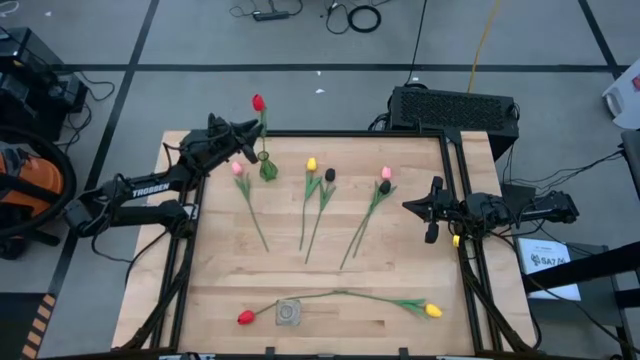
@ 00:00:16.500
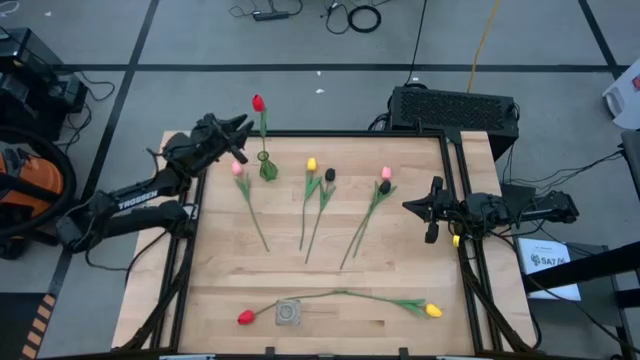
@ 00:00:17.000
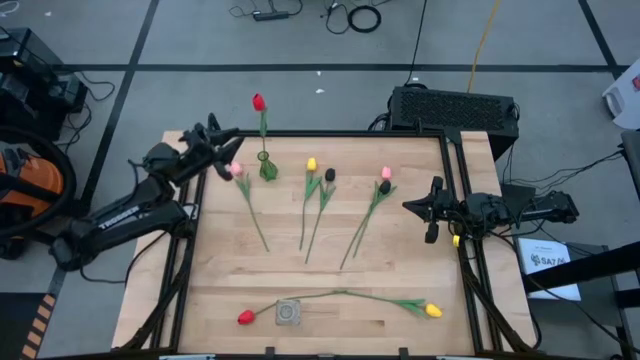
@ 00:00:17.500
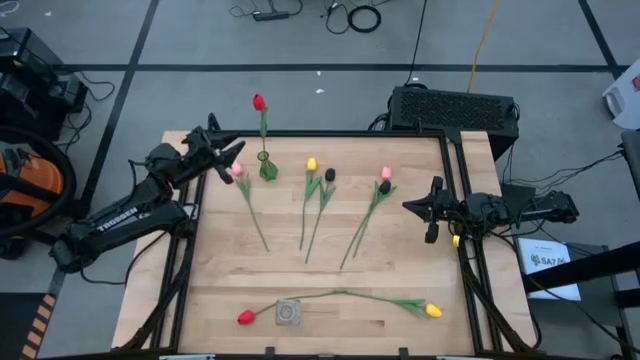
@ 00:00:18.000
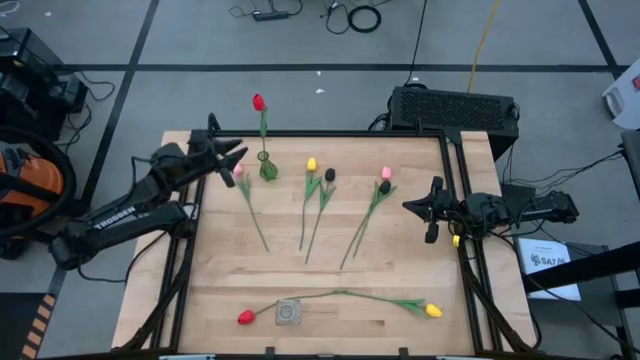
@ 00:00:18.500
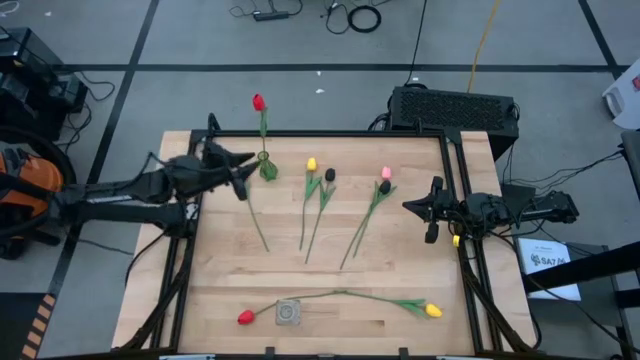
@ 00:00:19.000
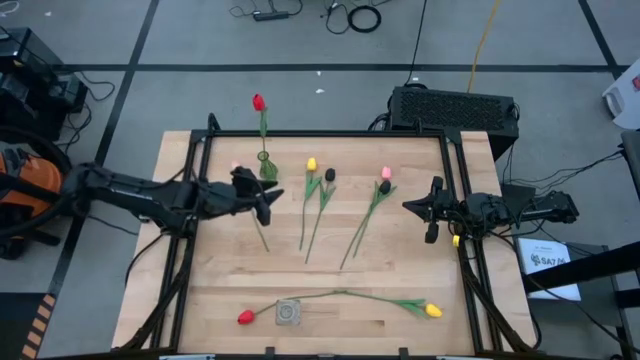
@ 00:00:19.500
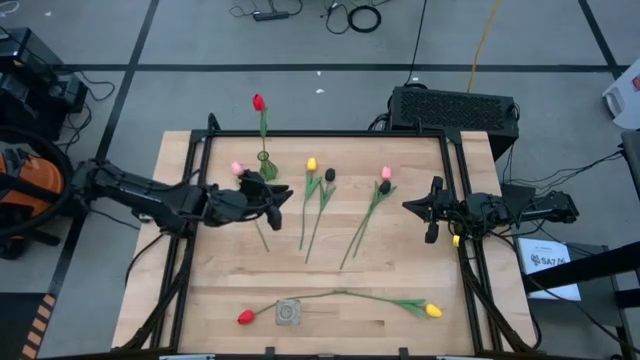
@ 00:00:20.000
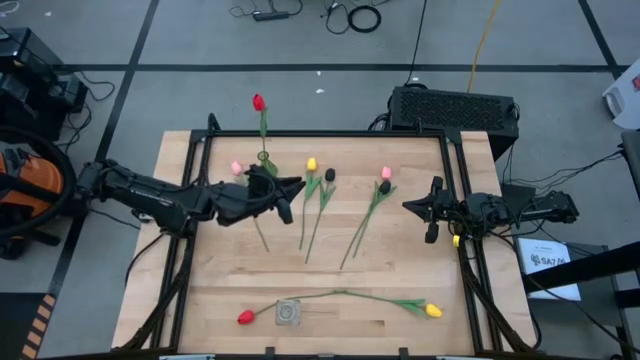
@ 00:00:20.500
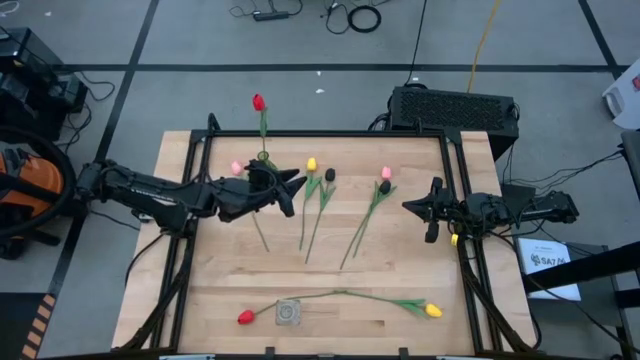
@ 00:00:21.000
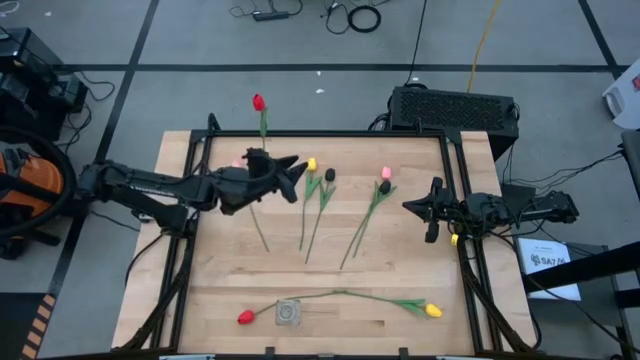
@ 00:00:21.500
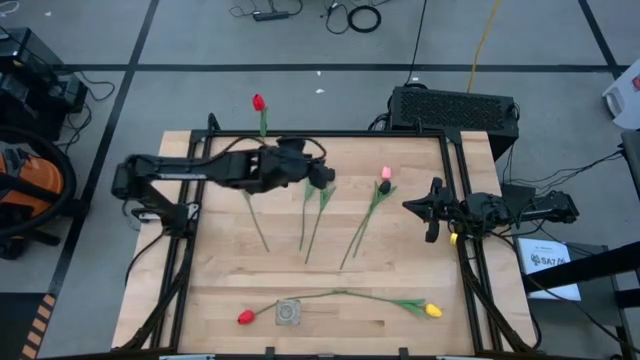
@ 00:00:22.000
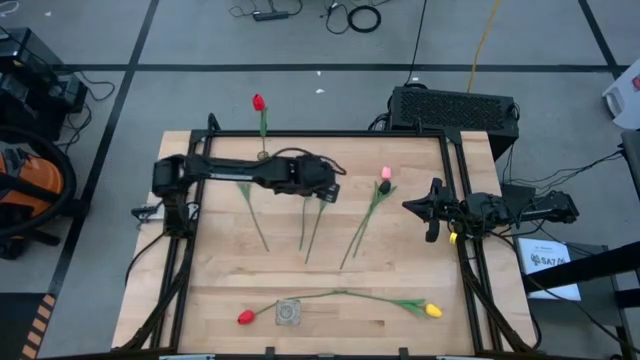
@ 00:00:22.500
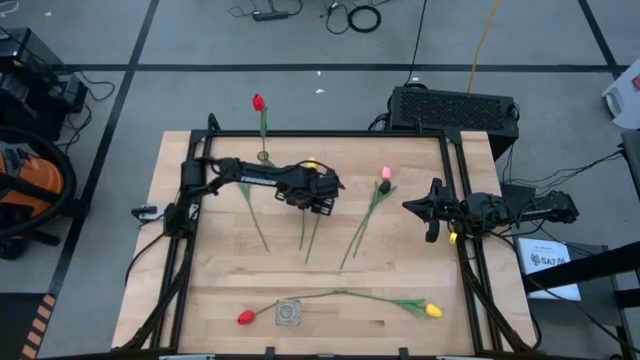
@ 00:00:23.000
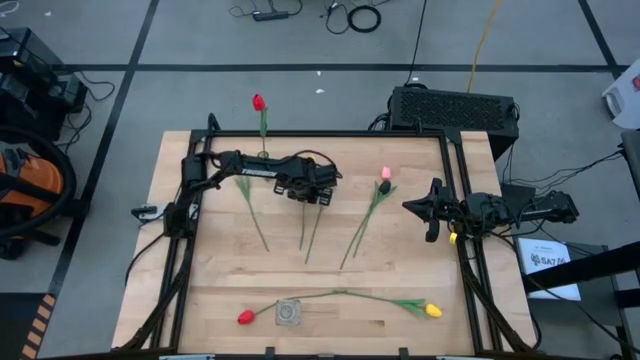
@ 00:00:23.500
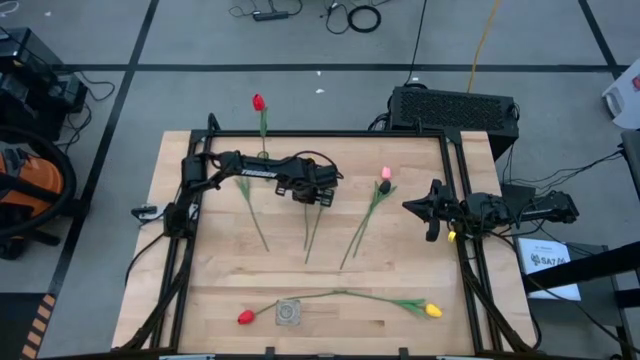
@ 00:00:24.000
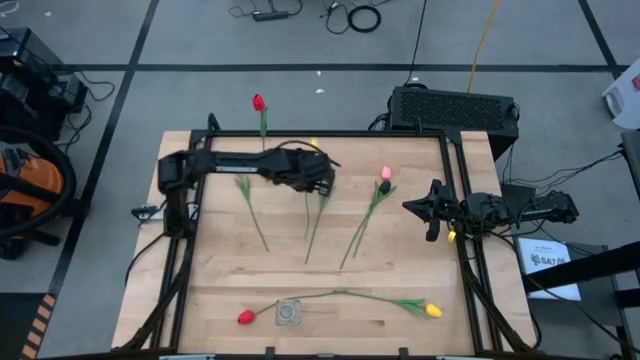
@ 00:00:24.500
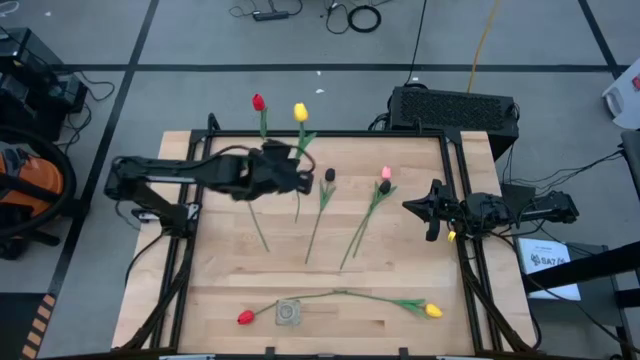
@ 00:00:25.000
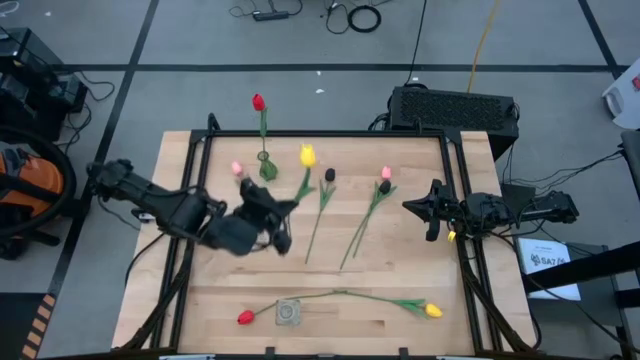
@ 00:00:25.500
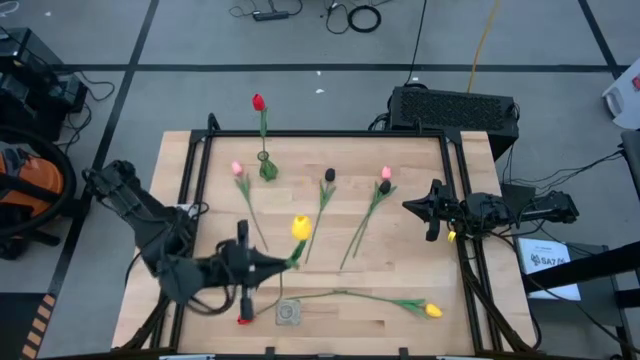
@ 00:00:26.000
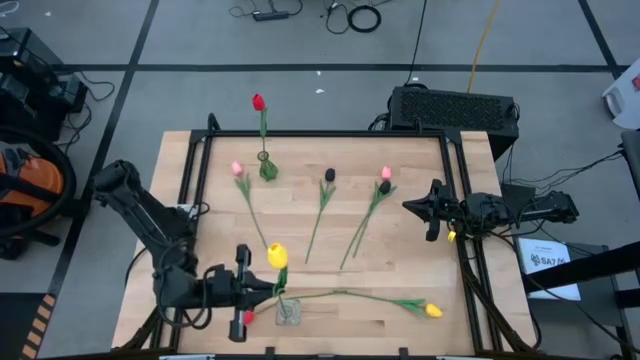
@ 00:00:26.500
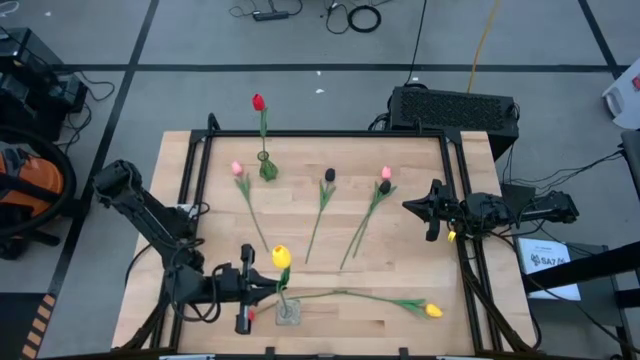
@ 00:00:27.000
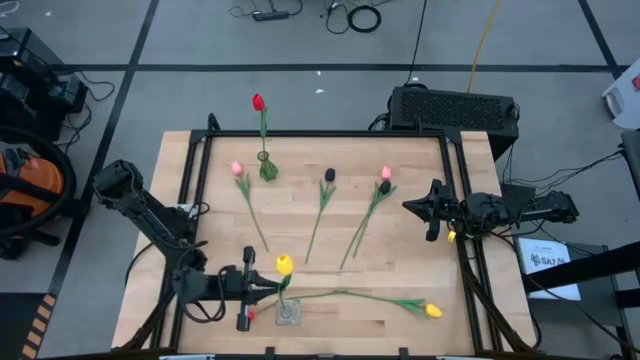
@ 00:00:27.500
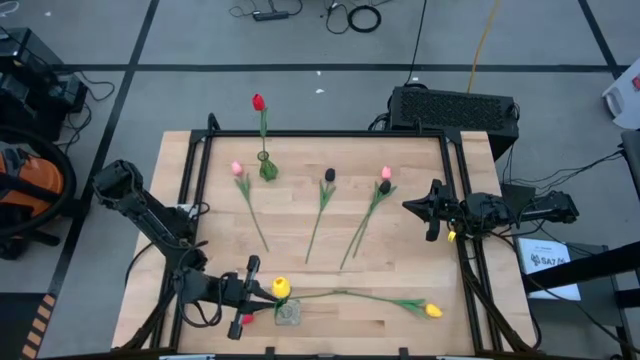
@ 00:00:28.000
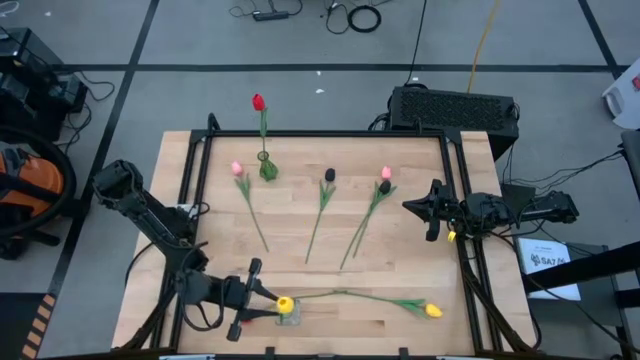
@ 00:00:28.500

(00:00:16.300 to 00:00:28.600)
Task: Sort flowers into vase by color
Put the top yellow flower into the transparent vase

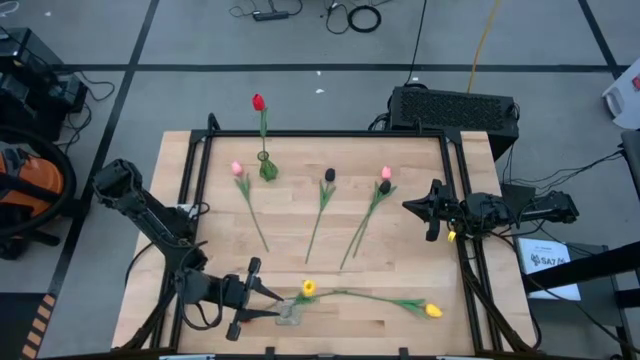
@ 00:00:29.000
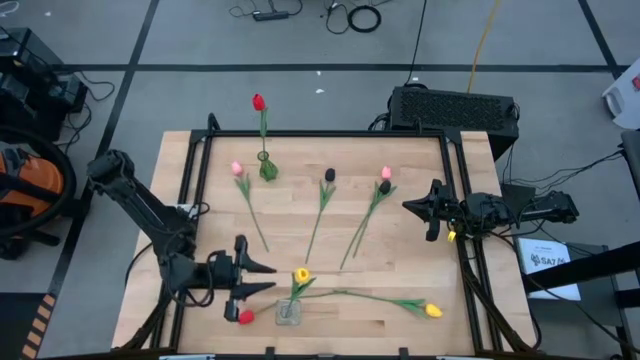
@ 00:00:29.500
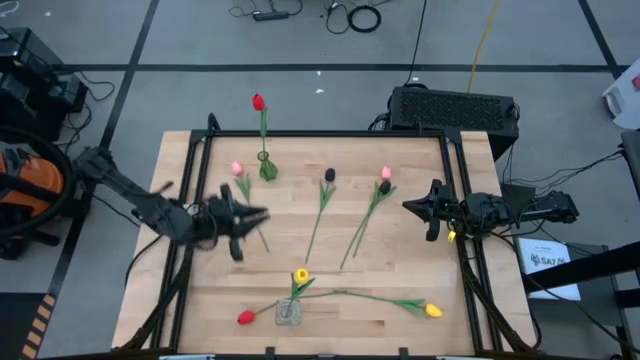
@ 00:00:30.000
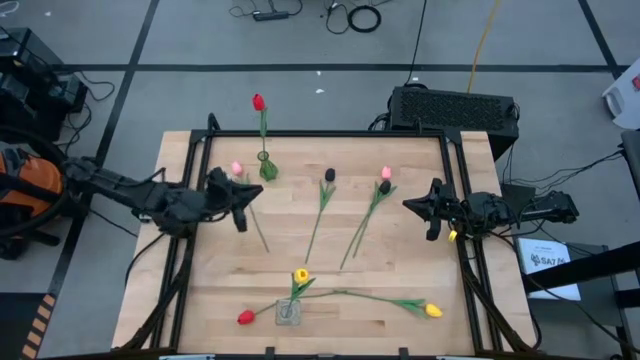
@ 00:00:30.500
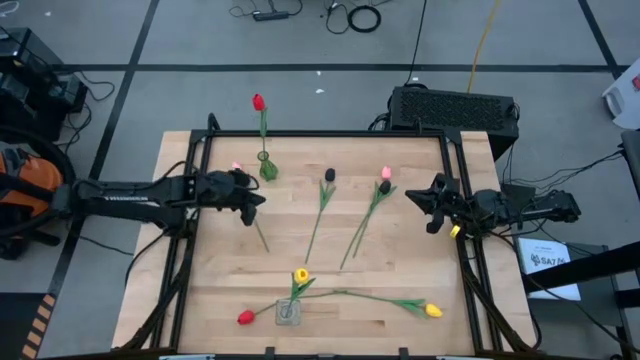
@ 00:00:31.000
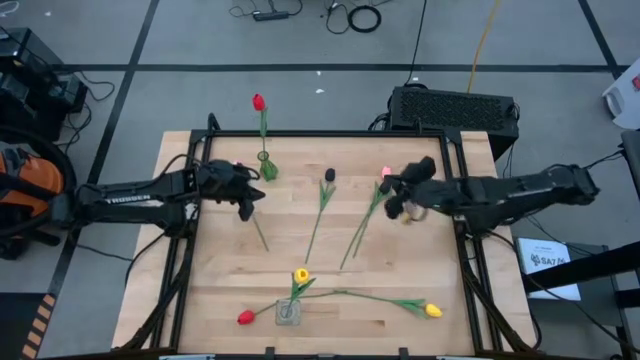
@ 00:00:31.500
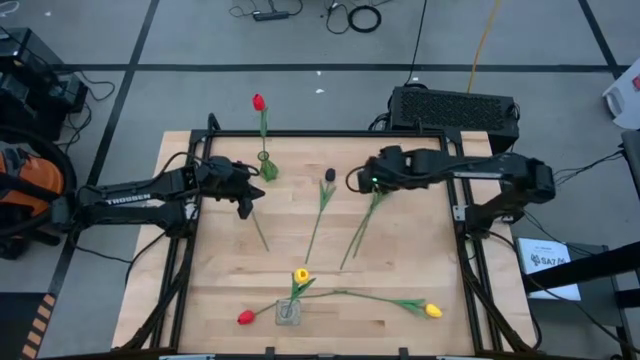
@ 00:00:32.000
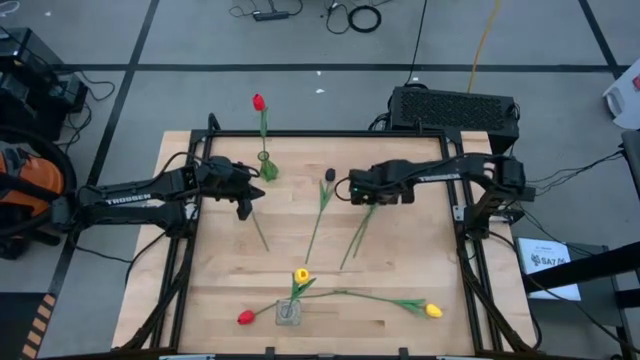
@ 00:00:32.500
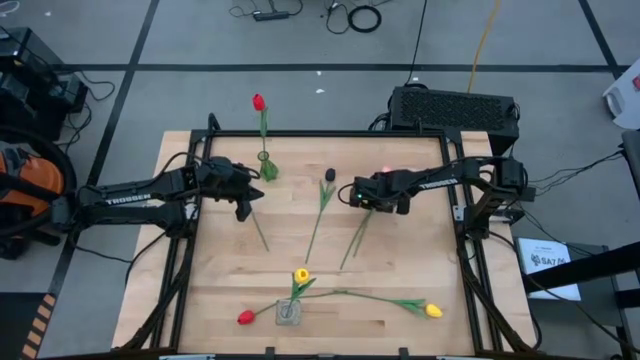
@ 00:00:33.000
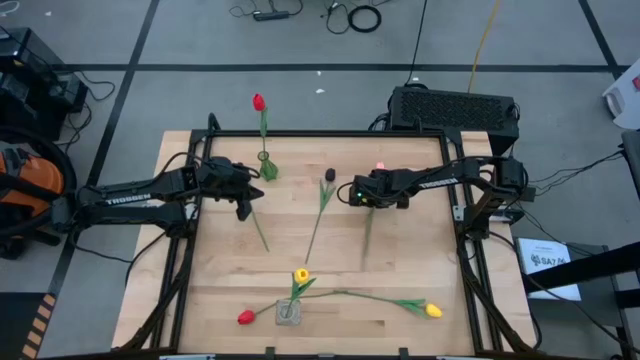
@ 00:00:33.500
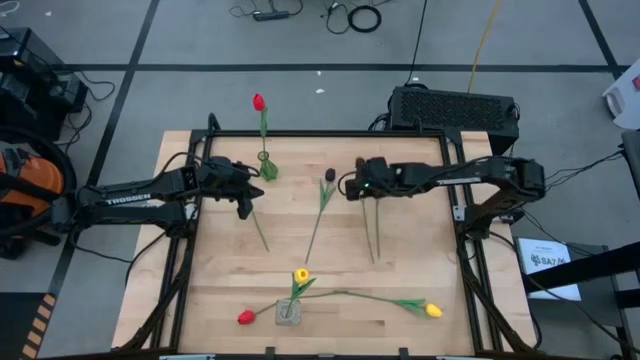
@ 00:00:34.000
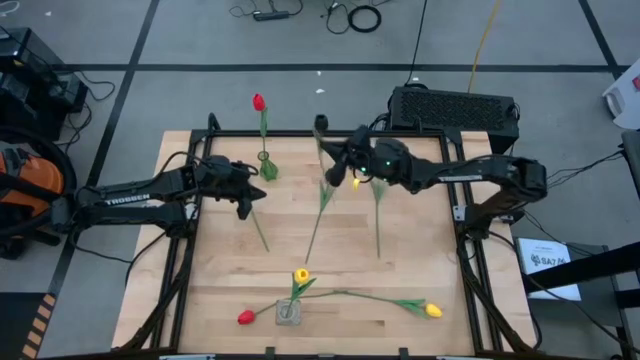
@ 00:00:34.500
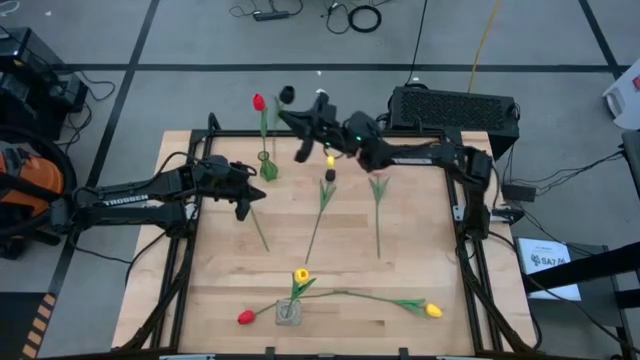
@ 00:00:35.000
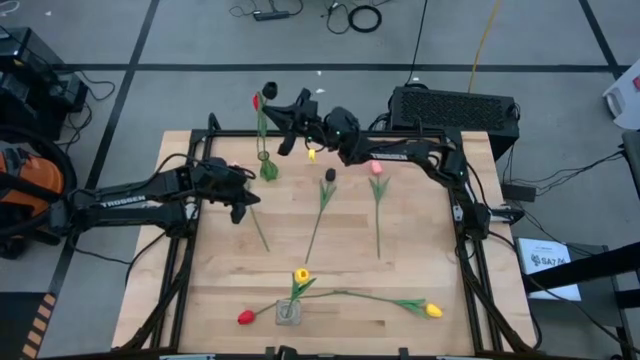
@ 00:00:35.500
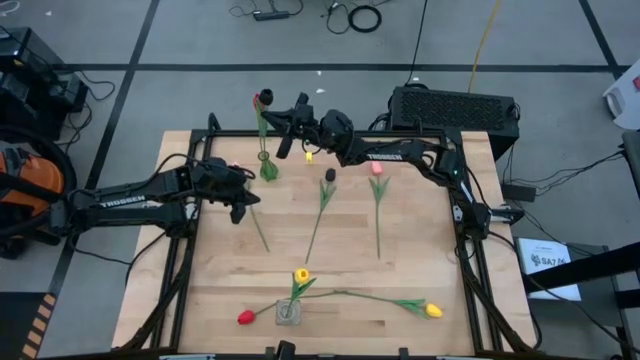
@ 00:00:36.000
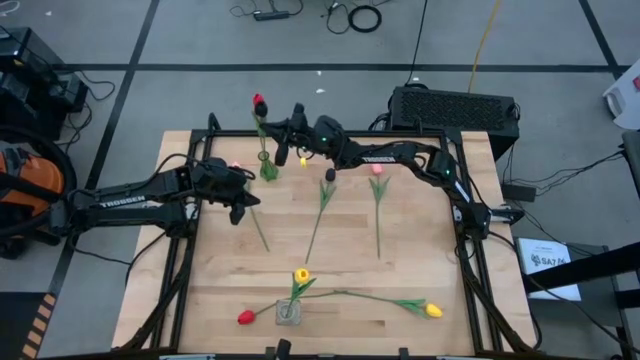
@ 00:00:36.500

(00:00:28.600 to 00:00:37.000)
Put the right black flower into the green vase
